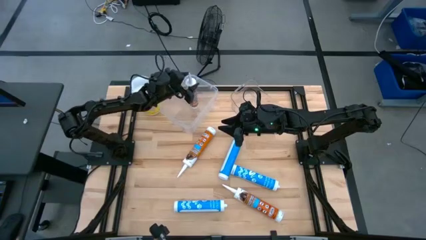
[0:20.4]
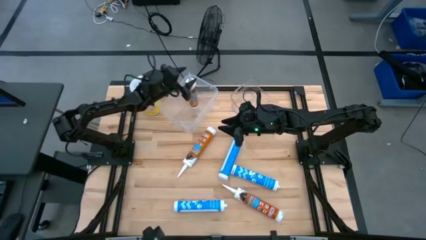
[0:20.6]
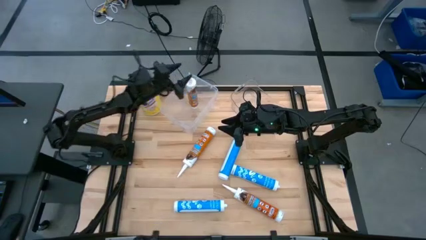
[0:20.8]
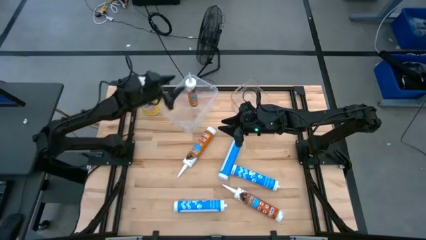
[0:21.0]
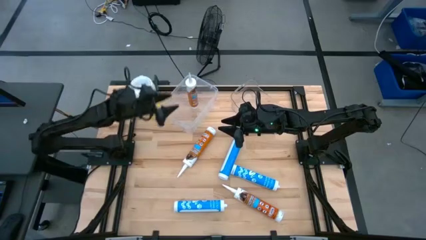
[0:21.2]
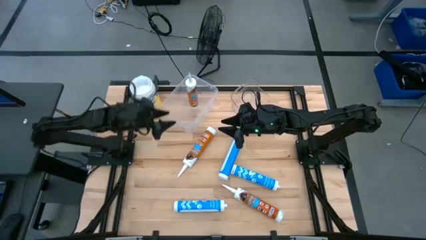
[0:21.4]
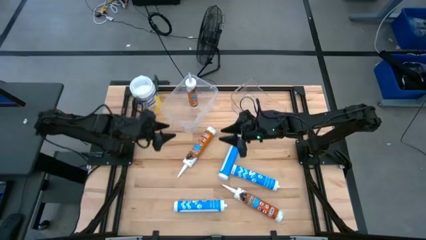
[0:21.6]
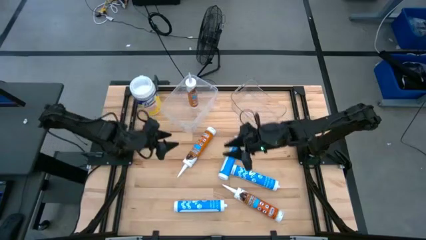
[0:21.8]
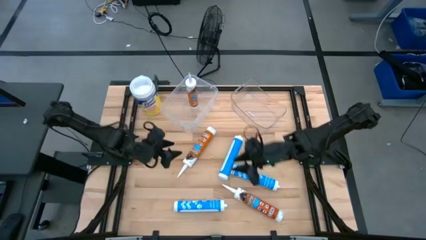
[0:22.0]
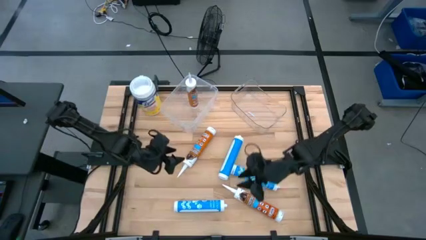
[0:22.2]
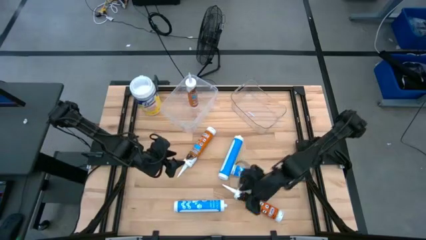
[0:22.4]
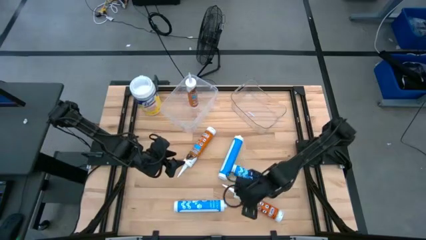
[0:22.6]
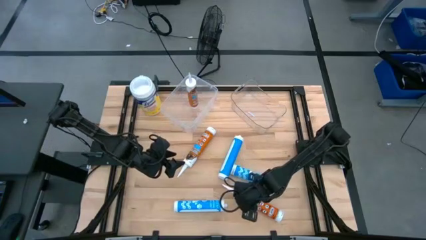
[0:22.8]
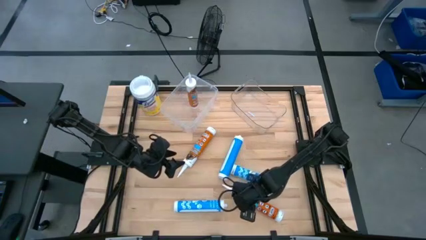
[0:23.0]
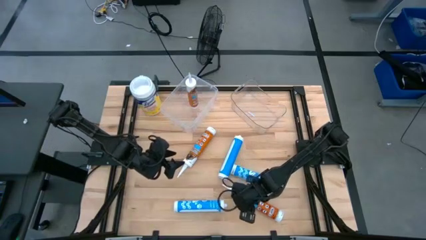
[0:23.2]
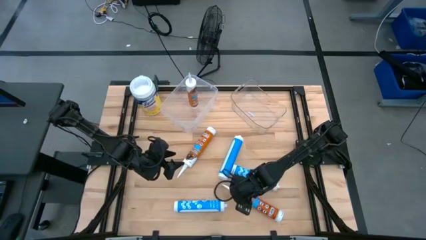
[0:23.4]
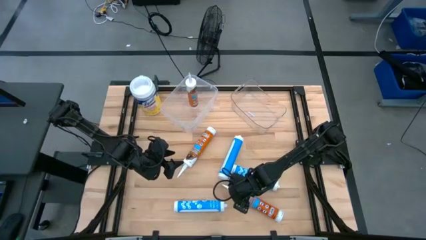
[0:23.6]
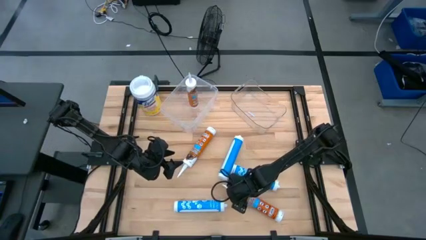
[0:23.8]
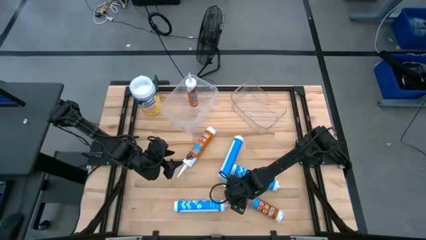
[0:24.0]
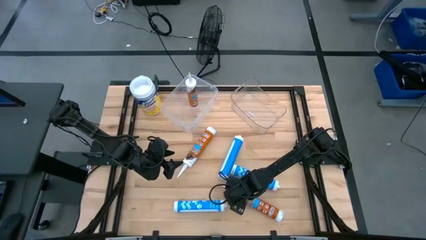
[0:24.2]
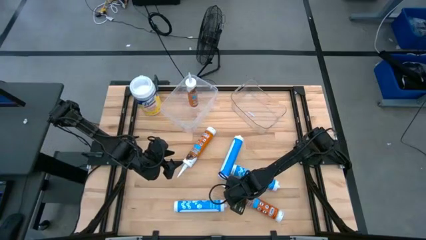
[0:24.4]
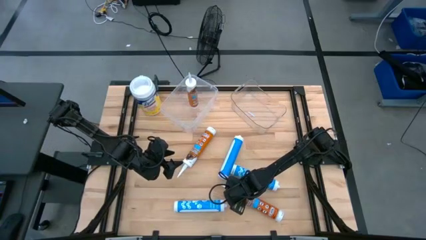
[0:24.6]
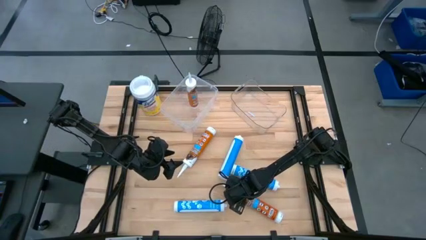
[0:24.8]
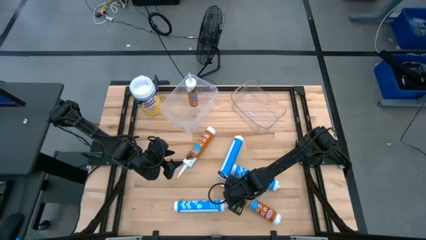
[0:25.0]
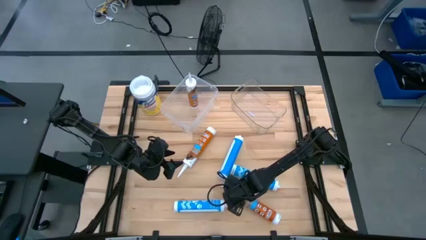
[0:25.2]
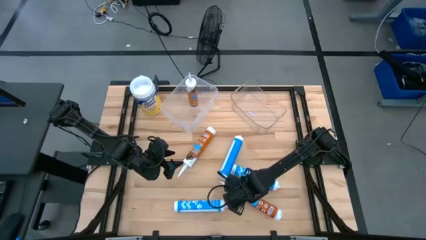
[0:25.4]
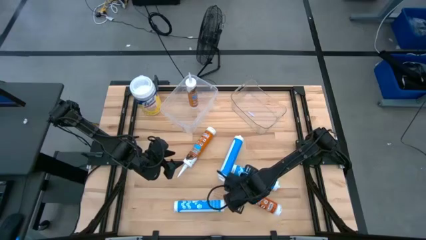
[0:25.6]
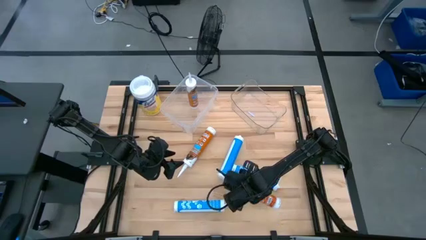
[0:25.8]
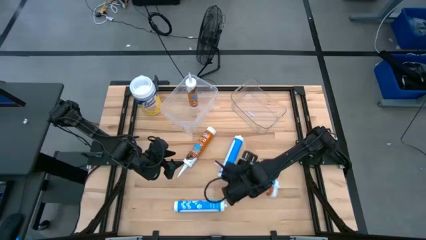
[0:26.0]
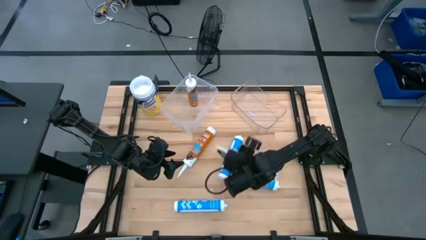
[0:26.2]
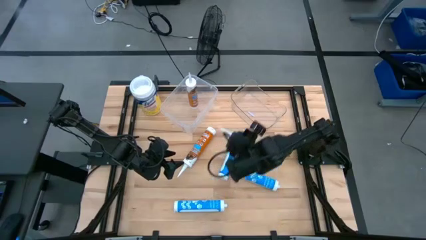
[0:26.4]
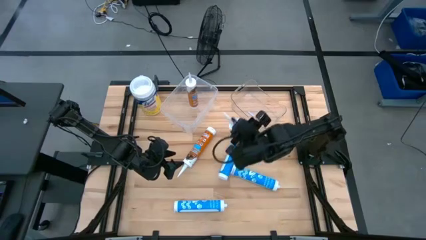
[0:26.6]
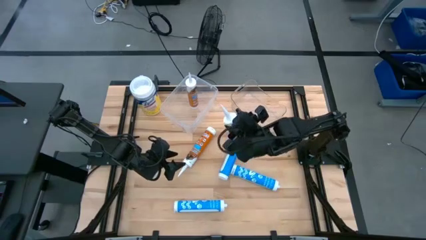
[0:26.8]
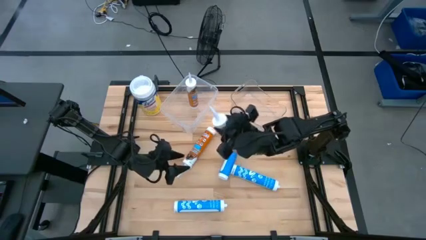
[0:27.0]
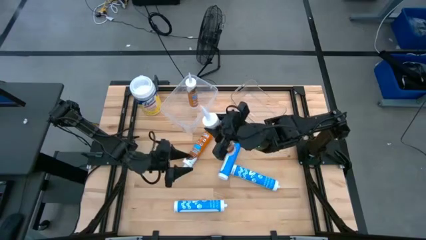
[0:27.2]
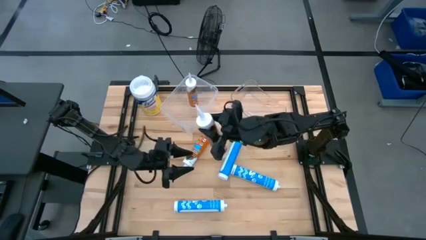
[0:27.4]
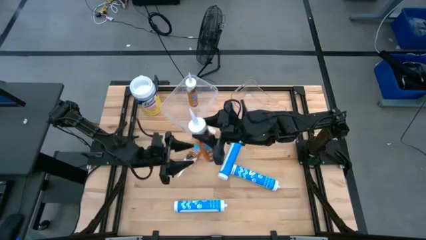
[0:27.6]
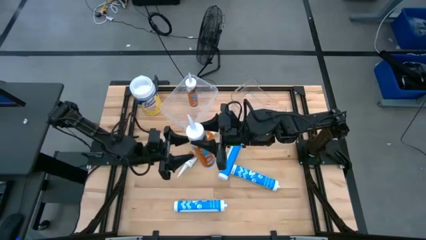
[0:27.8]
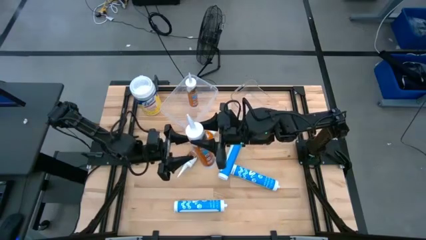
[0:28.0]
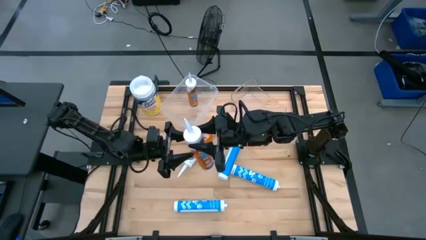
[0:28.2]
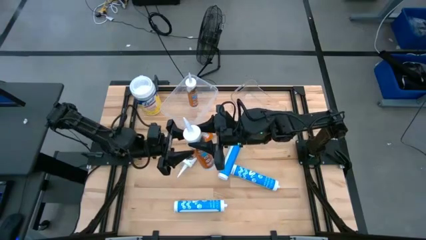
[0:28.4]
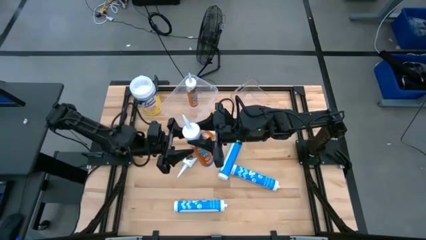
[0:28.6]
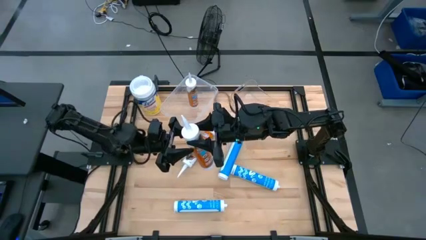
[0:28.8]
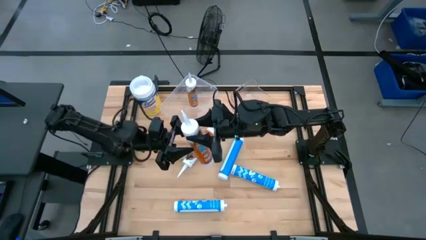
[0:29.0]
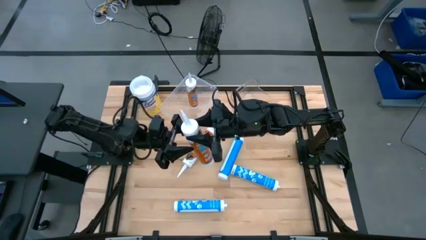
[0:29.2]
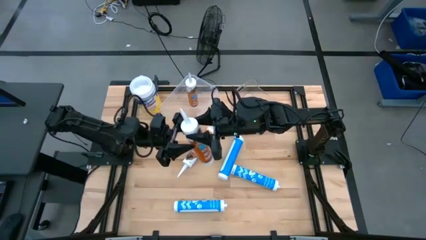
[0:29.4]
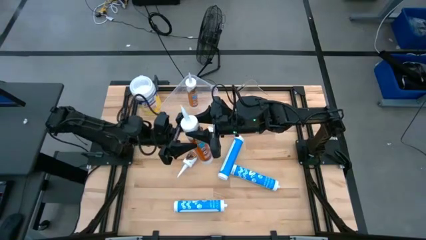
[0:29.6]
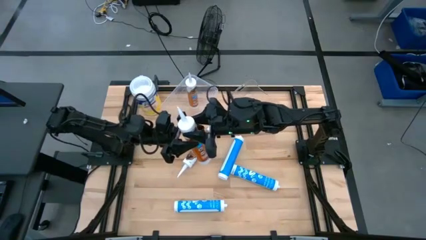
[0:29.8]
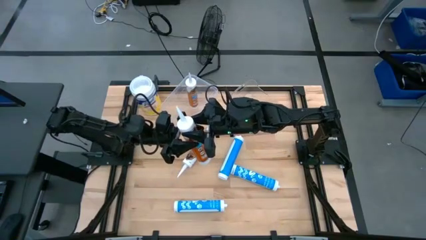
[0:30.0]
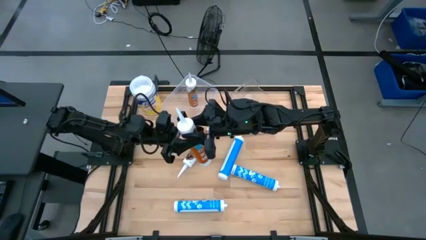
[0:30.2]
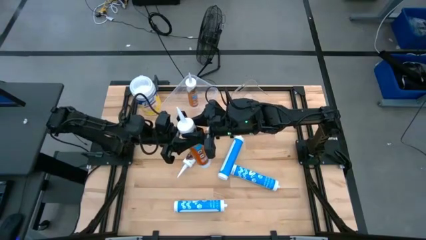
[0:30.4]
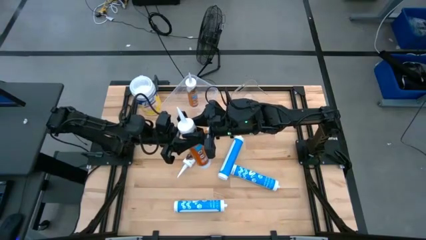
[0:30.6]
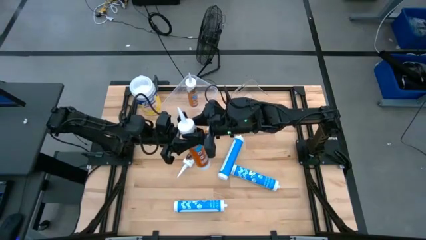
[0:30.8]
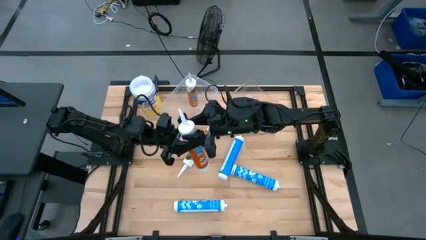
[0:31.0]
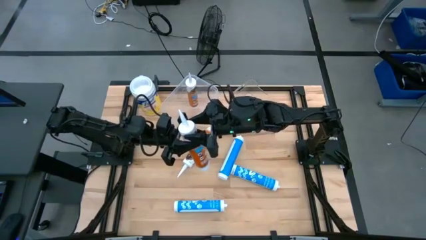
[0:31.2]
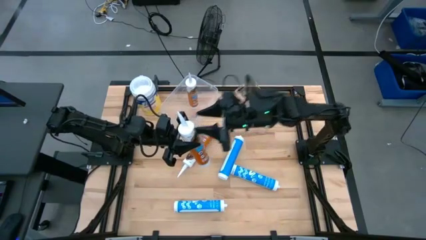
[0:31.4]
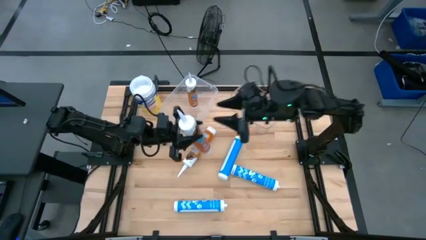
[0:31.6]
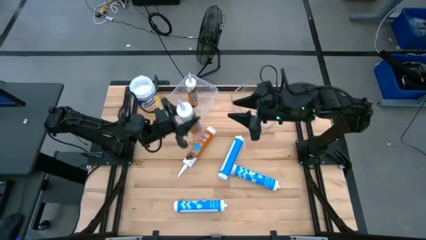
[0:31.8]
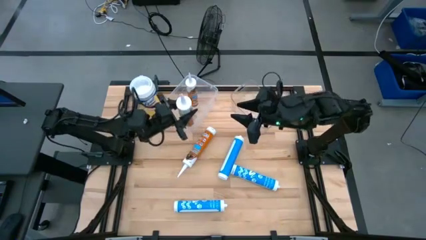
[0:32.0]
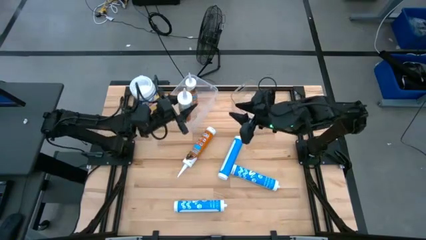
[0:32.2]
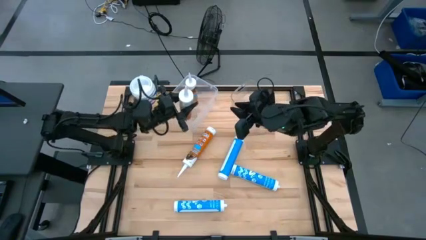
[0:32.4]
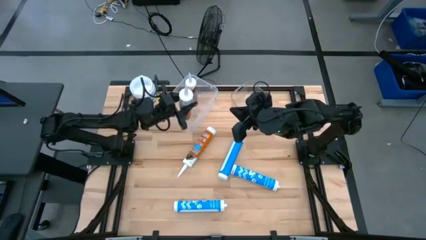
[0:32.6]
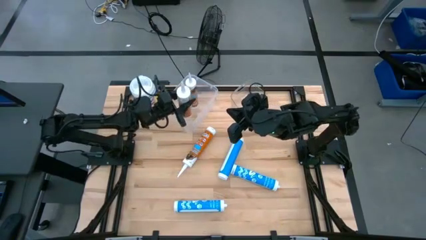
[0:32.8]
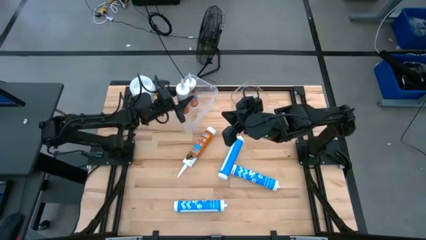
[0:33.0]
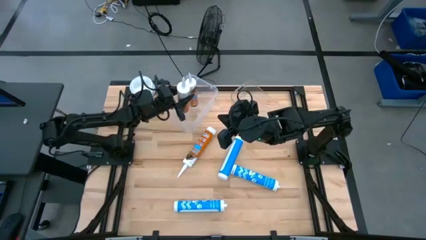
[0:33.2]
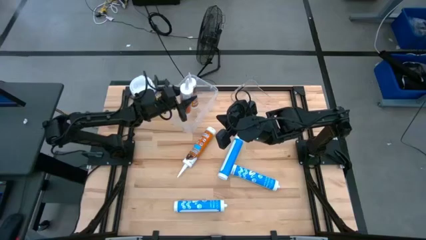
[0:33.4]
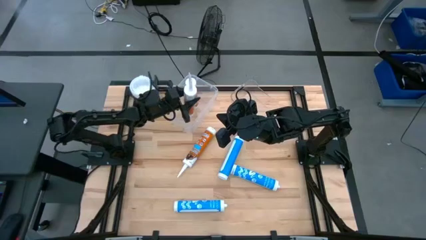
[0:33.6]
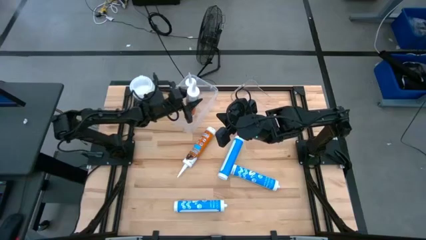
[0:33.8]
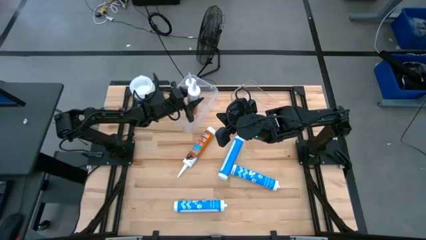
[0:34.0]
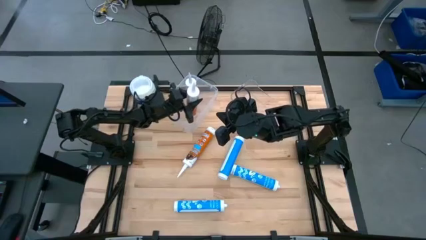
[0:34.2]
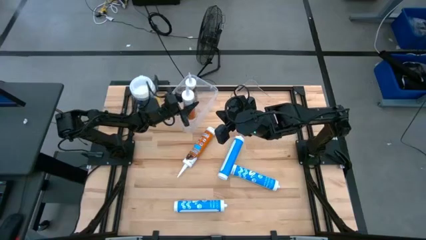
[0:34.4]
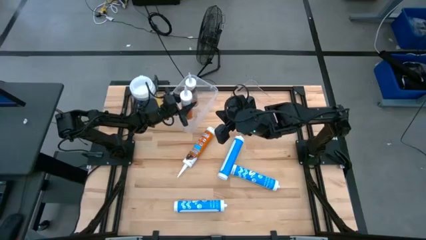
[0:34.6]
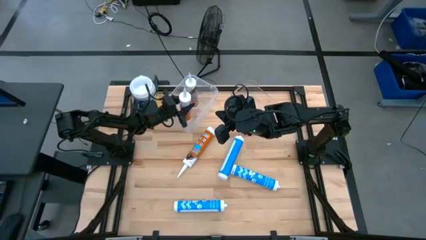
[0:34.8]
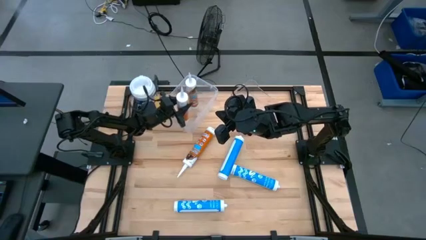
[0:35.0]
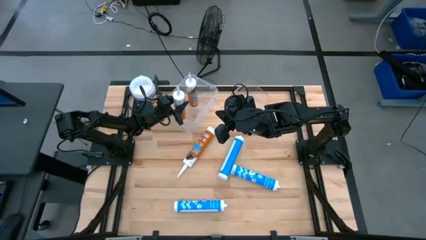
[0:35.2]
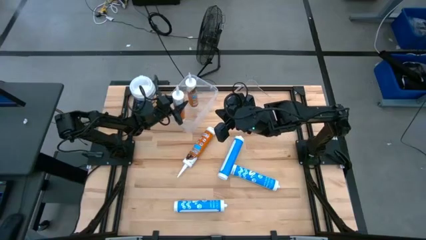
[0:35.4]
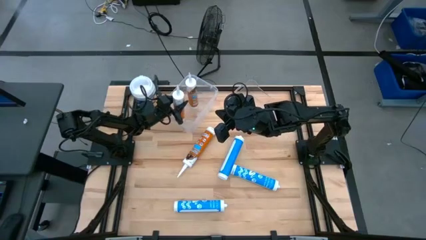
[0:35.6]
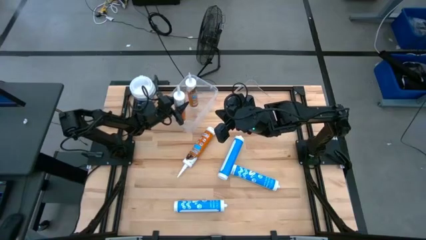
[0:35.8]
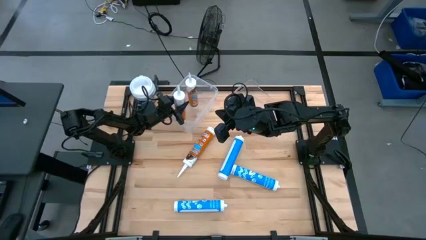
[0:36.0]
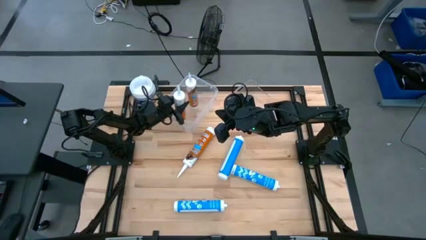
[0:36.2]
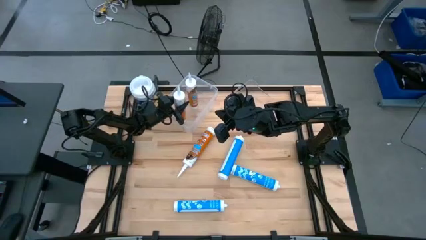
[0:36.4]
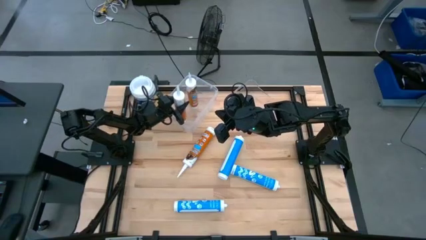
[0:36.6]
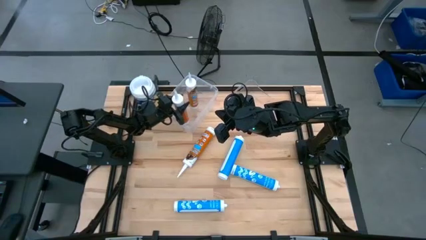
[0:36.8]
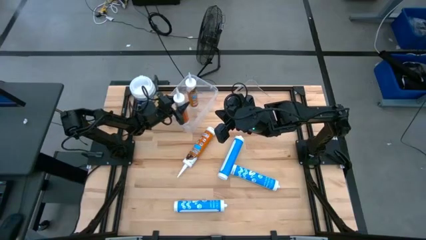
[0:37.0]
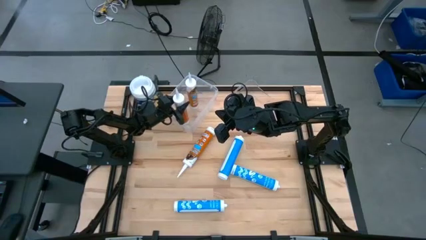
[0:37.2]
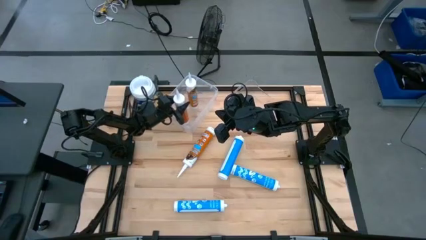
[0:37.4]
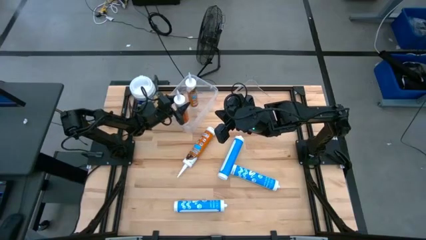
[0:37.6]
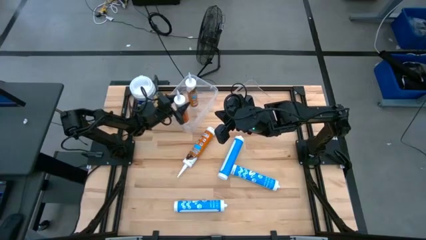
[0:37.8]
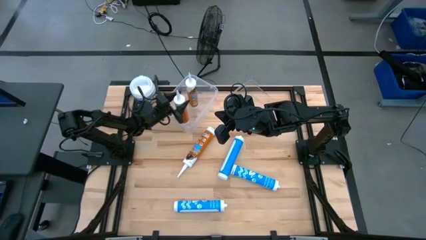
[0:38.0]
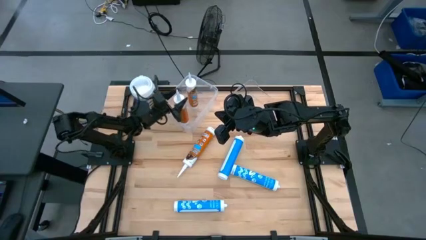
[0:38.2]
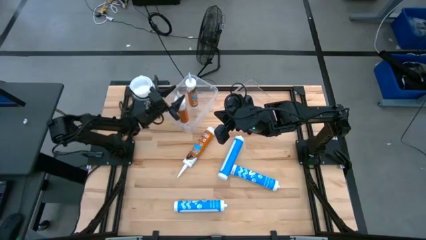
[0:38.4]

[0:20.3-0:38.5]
Task: Pick & place silicon tubes, Sealant and Lysol wipes
Put the bottom brown sealant into the white transparent bin
